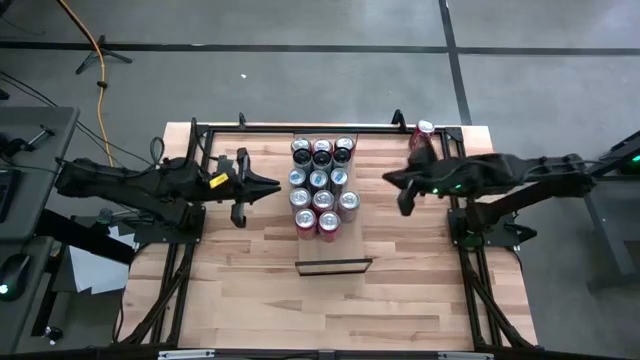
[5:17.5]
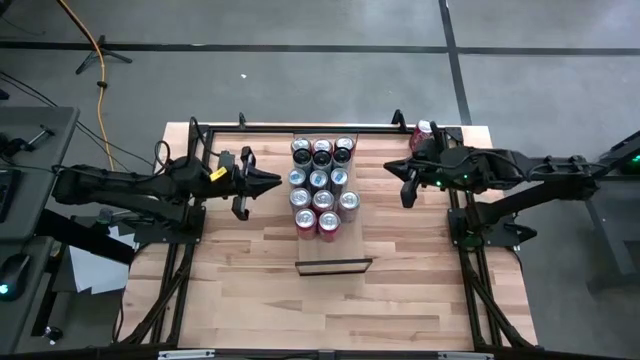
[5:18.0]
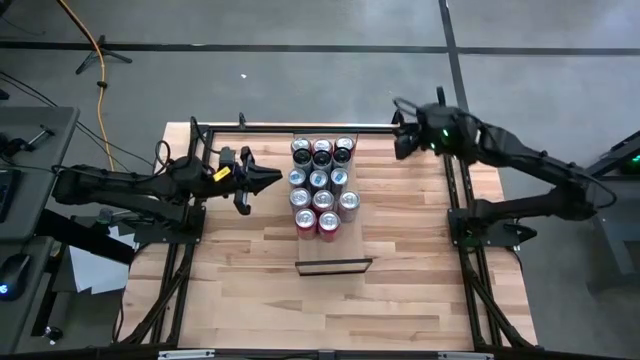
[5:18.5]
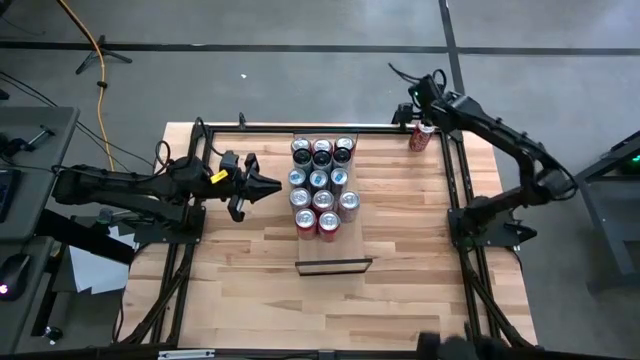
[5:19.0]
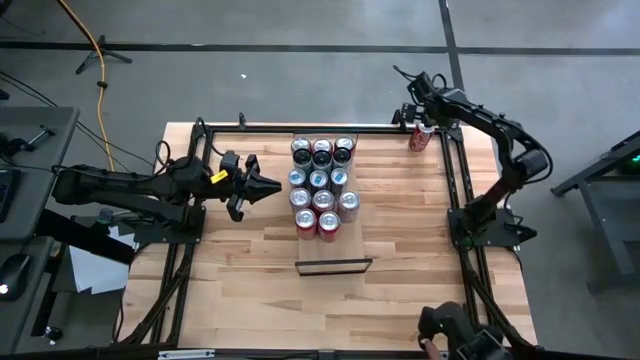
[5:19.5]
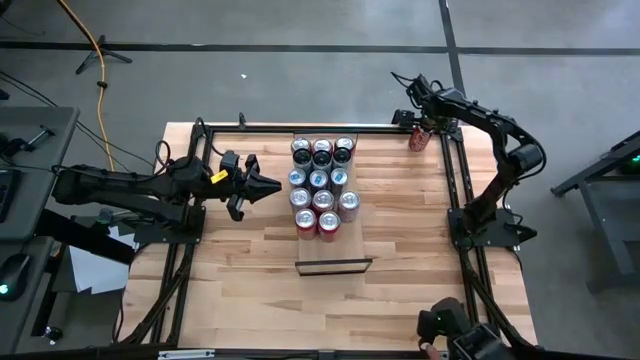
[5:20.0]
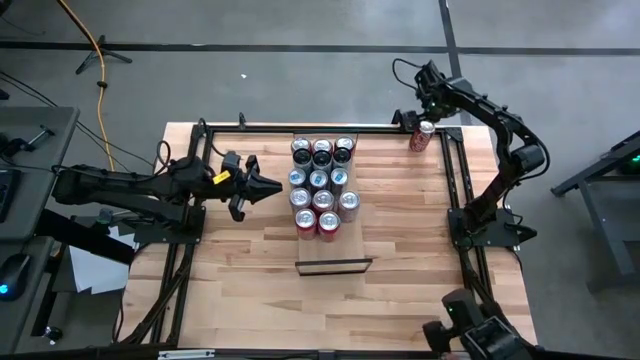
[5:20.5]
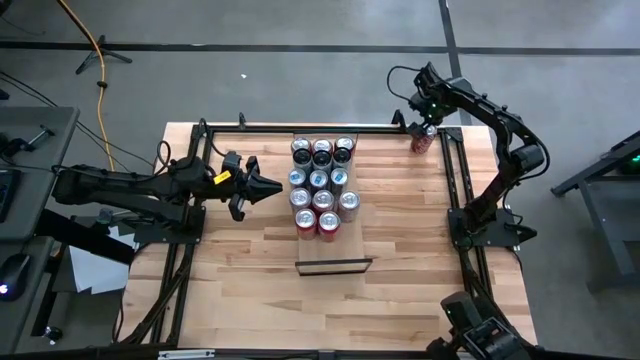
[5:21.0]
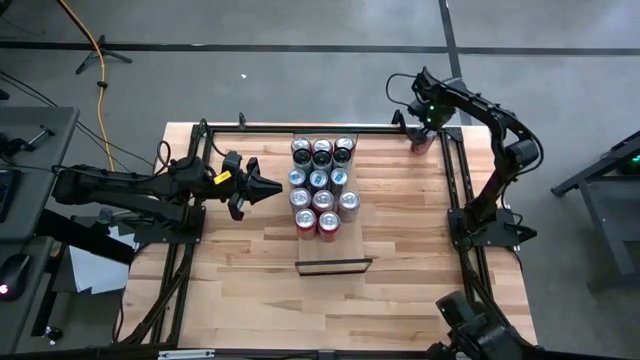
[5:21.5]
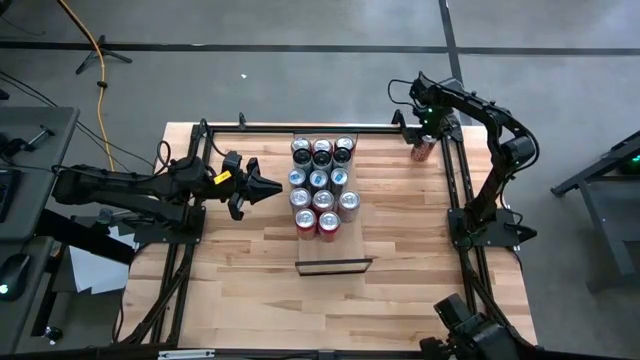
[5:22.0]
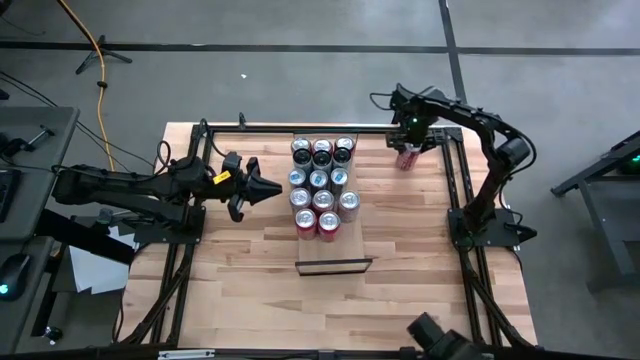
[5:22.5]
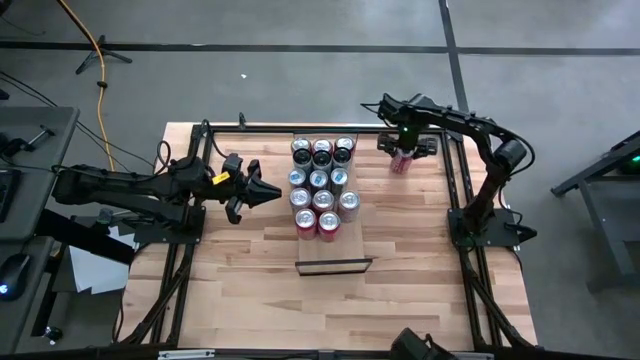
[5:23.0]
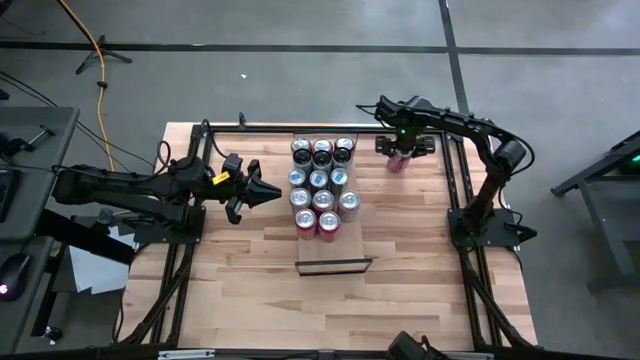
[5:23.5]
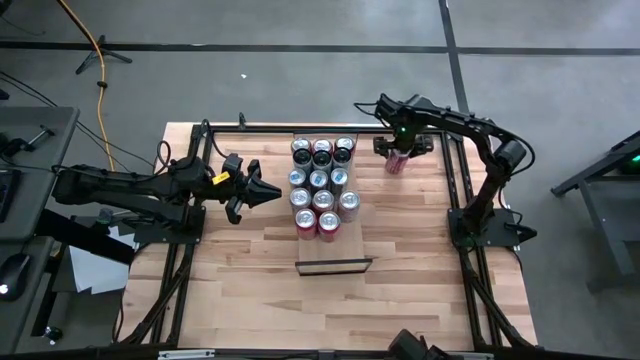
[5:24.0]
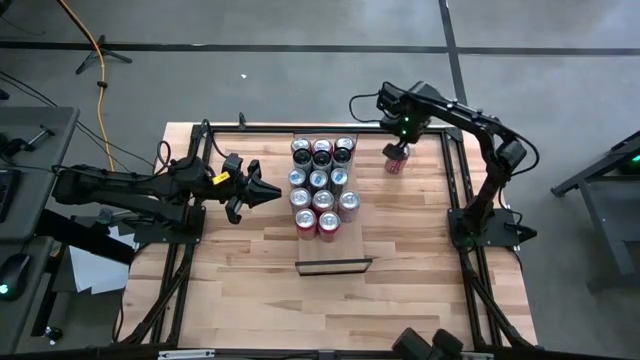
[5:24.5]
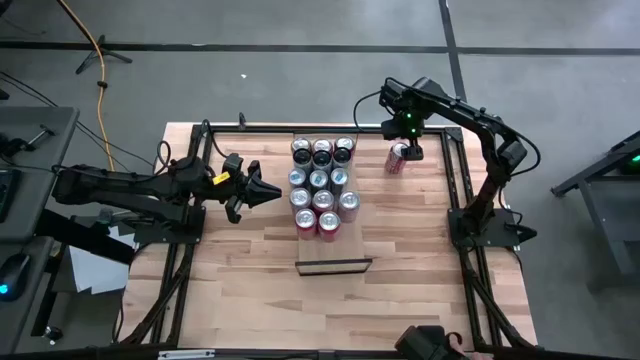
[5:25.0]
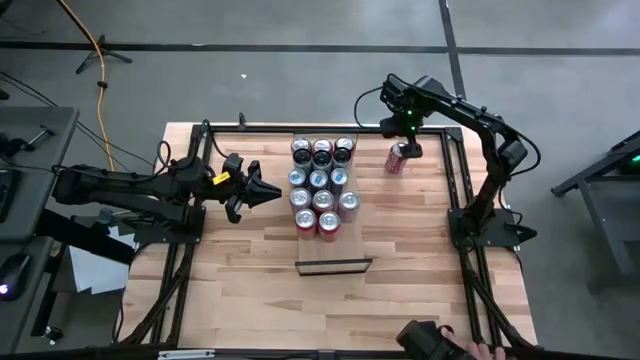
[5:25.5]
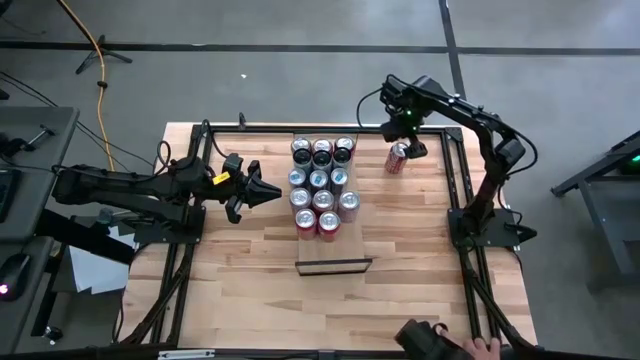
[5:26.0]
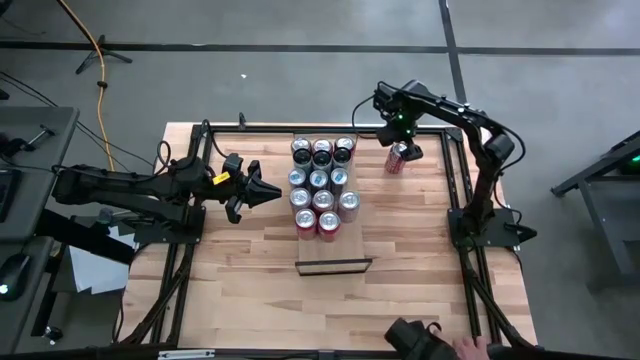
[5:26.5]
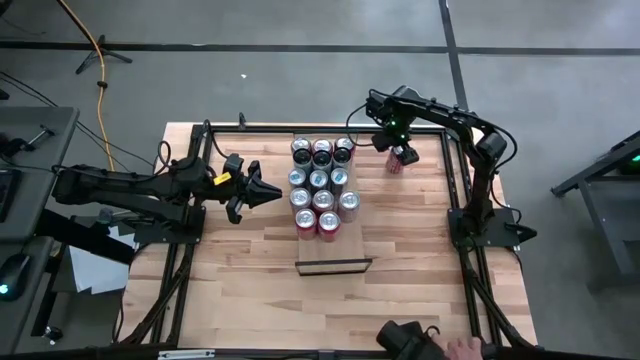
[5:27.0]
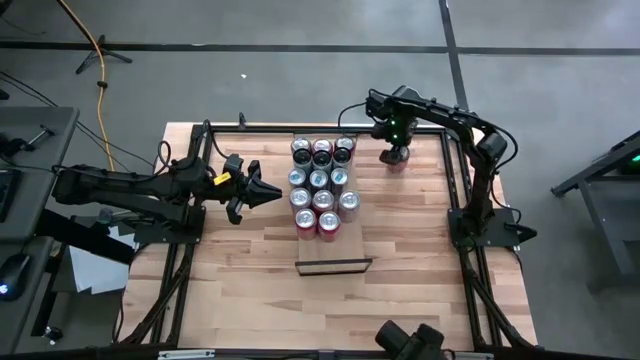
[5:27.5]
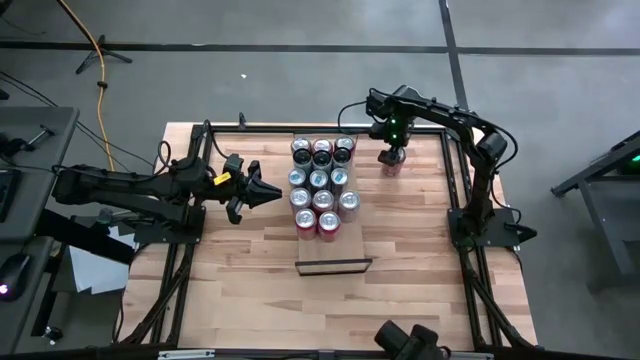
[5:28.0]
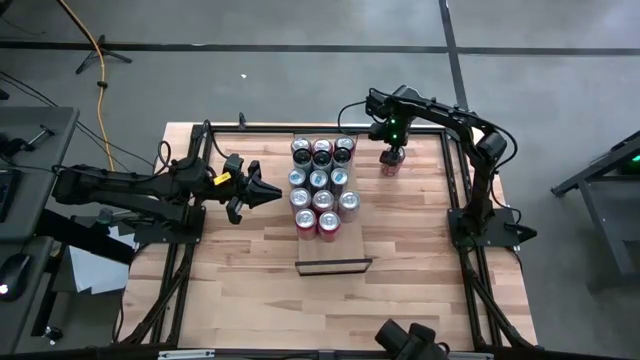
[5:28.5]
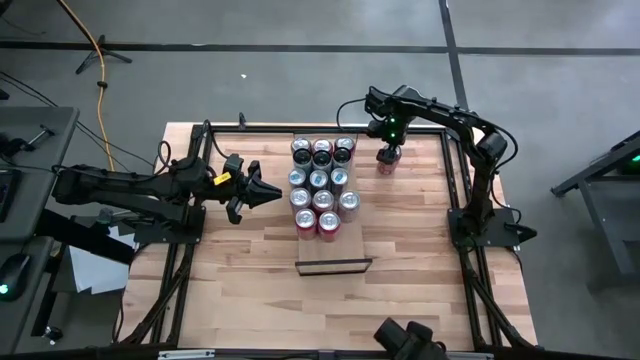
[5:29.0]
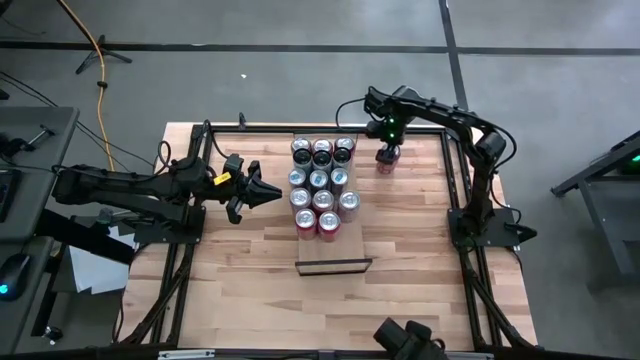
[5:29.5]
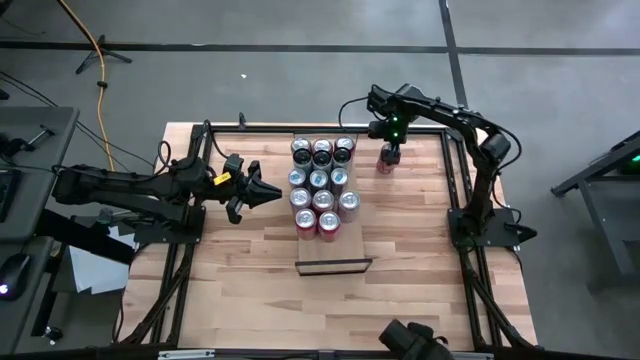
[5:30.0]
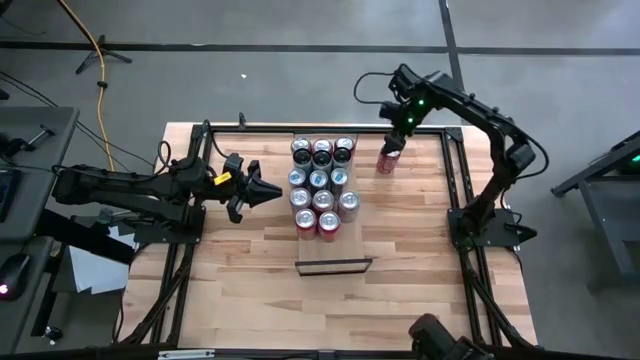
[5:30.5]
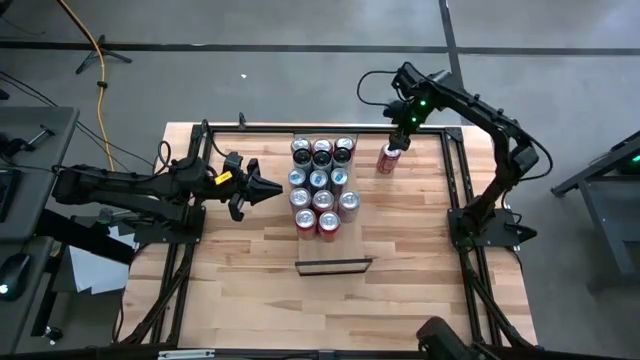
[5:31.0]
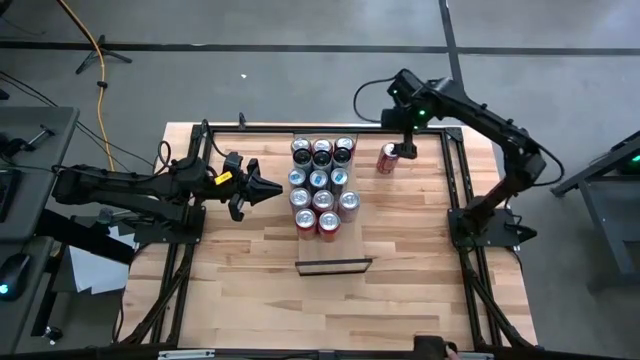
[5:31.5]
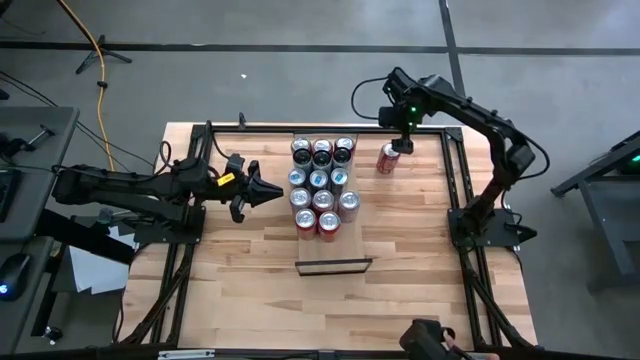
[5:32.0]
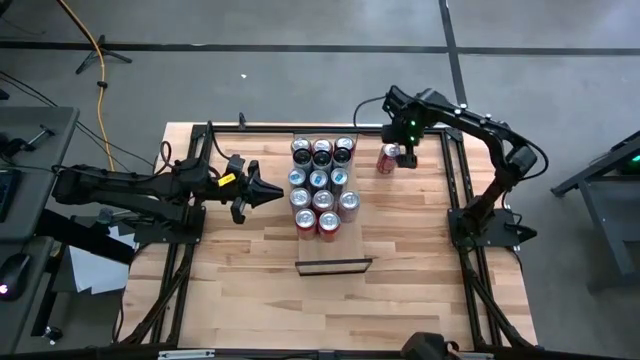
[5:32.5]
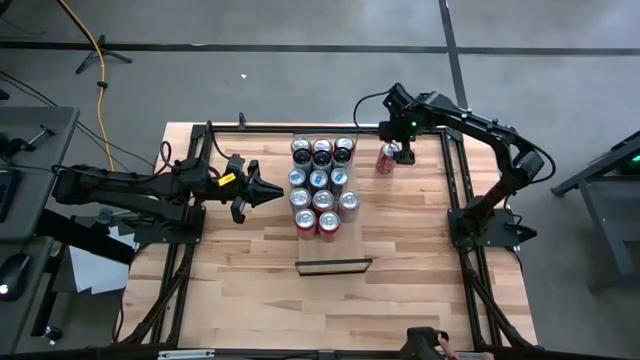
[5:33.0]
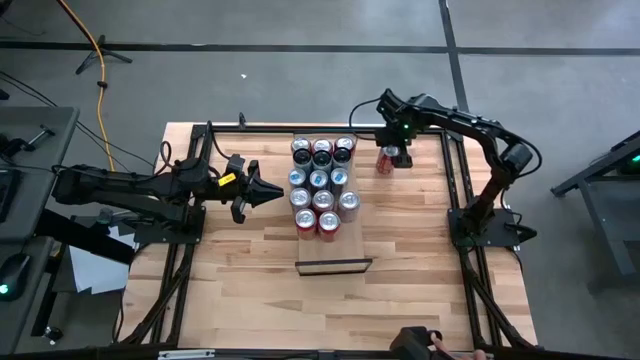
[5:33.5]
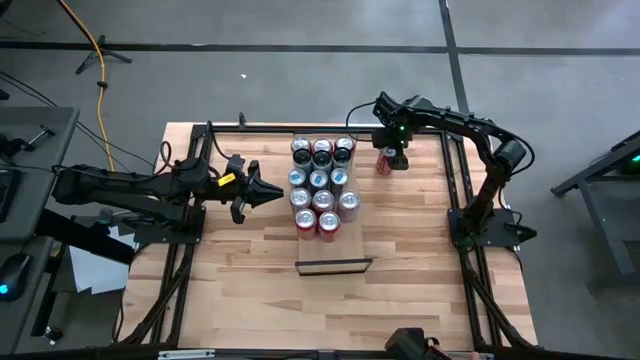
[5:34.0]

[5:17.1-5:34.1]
Task: Place canned beverage on shelf
Stack the red soda can on the top of the red soda can

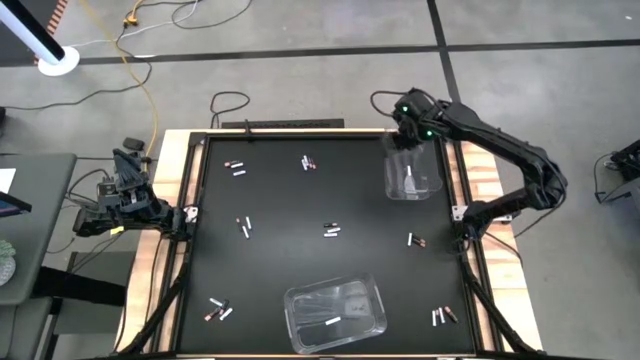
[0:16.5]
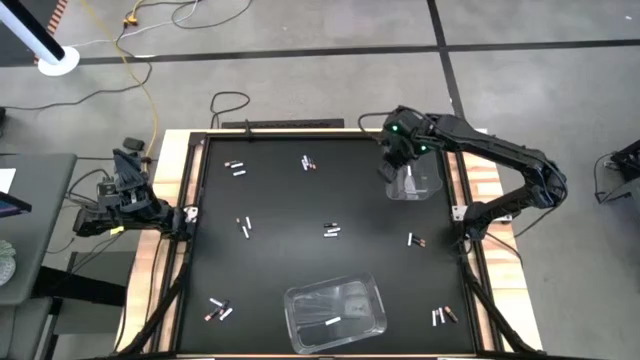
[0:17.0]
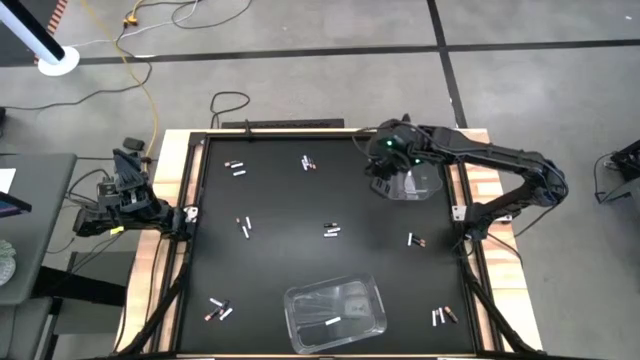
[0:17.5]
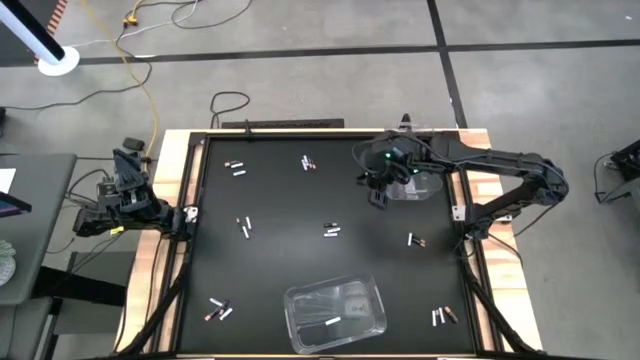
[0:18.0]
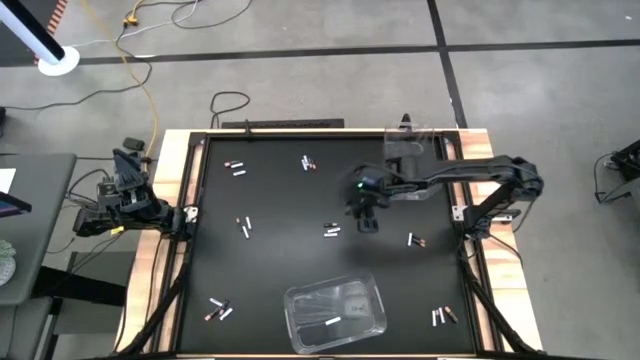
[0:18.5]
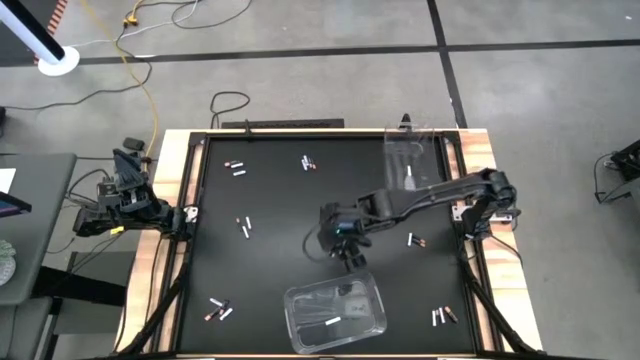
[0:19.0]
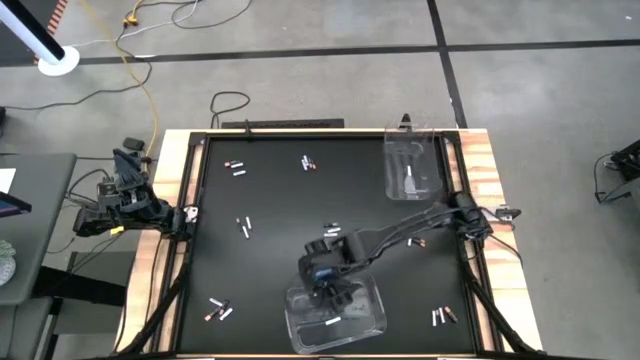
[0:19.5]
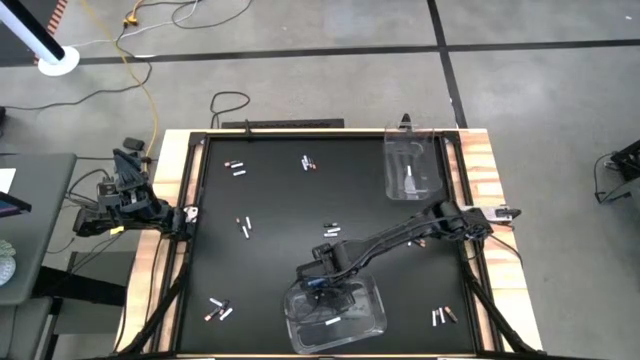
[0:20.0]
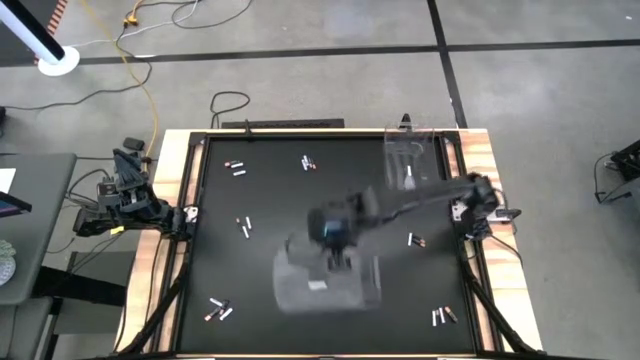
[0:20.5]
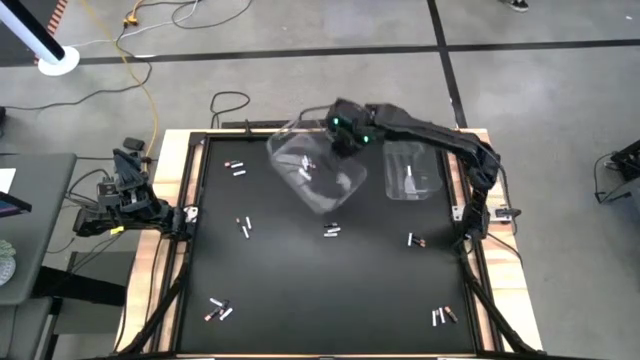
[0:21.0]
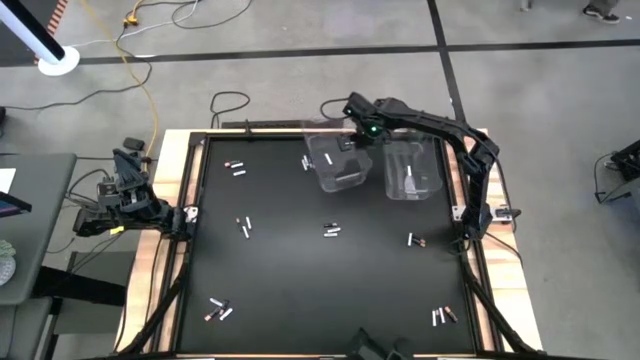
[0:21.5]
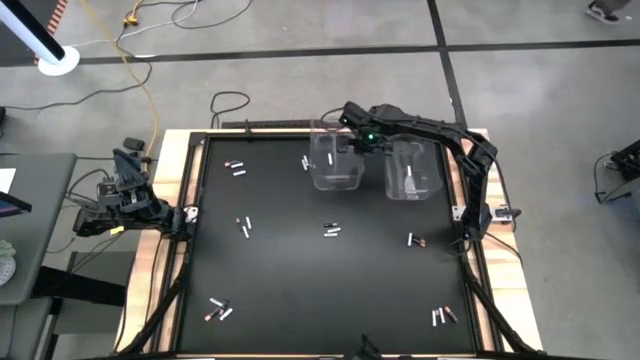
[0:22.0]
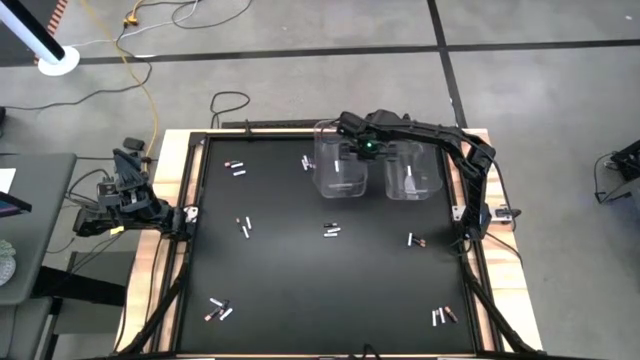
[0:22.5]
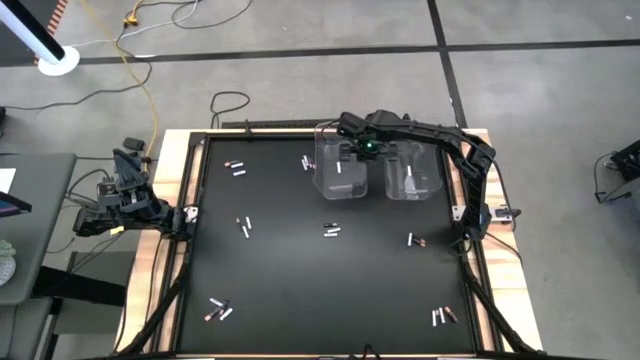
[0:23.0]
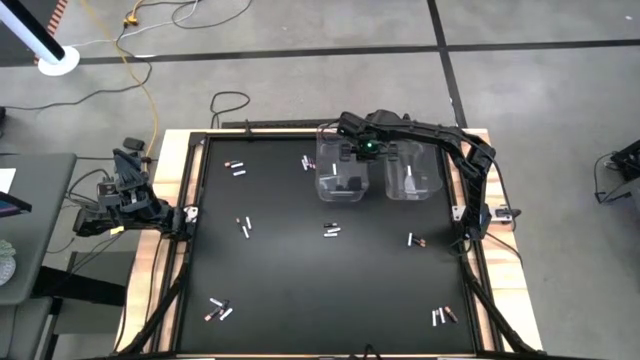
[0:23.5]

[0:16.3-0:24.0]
Task: Sort batteries
Move the bottom transparent bin to the top center of the table
